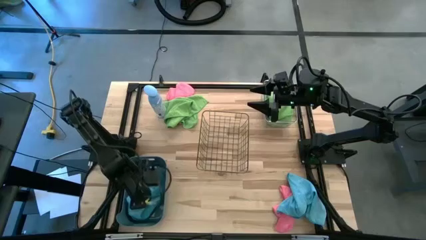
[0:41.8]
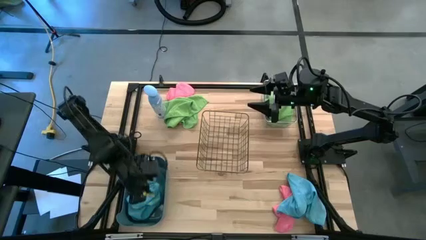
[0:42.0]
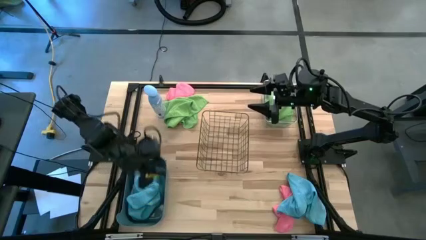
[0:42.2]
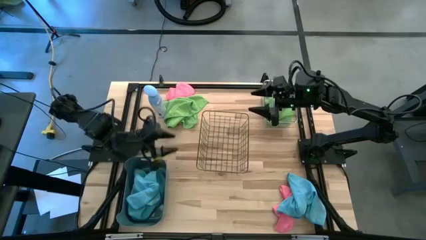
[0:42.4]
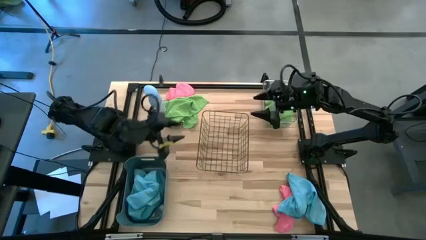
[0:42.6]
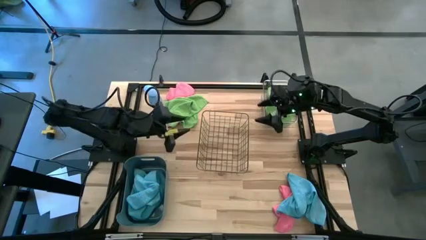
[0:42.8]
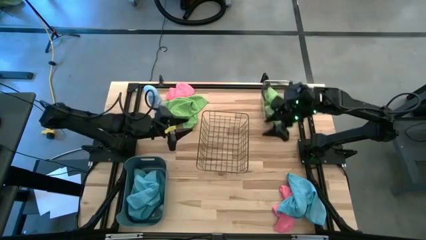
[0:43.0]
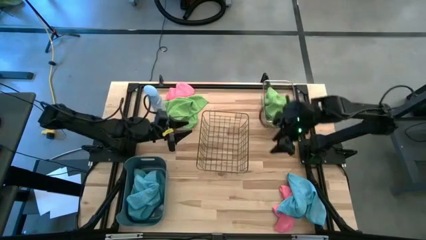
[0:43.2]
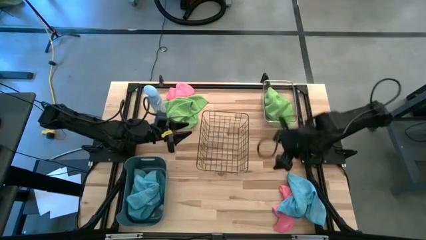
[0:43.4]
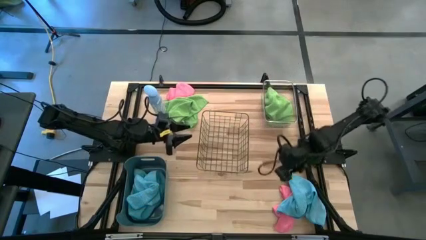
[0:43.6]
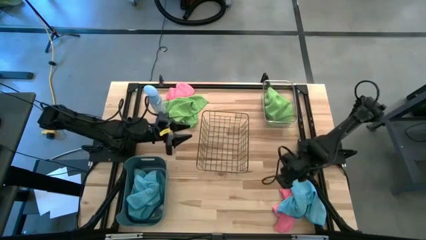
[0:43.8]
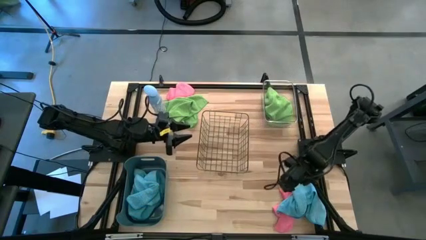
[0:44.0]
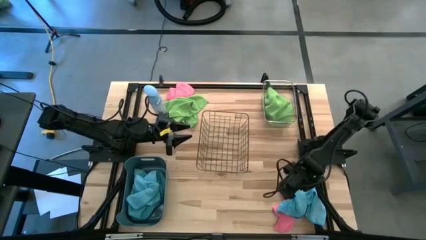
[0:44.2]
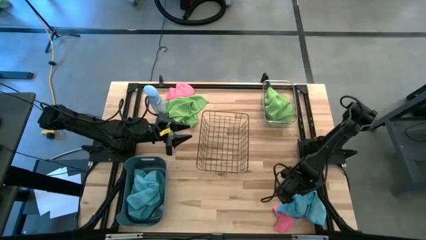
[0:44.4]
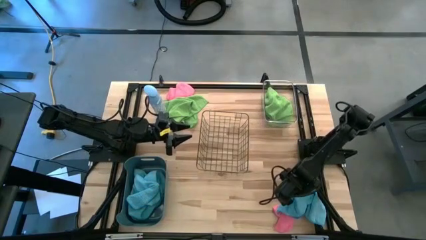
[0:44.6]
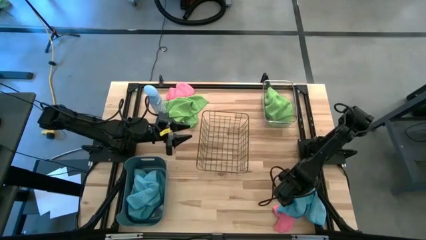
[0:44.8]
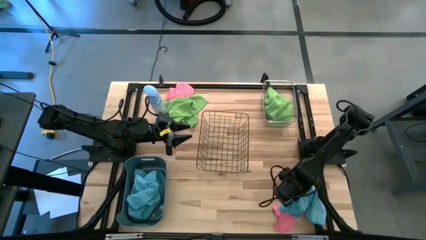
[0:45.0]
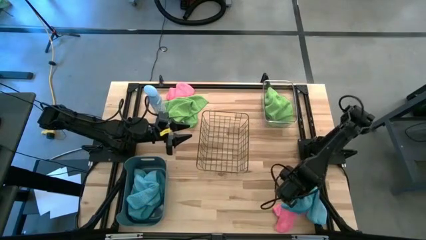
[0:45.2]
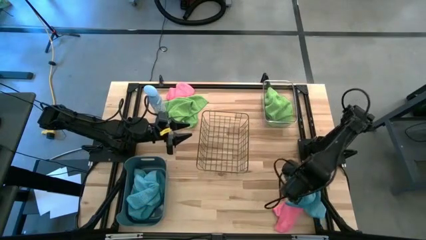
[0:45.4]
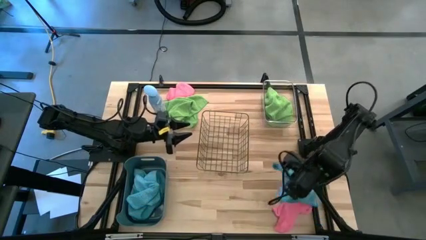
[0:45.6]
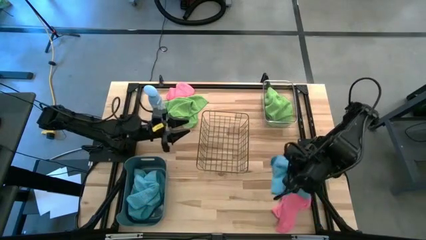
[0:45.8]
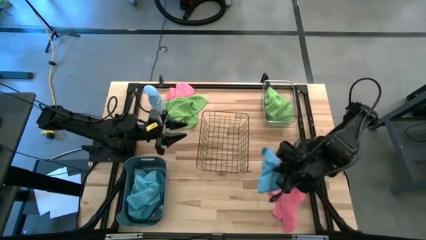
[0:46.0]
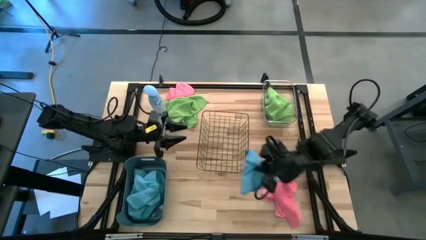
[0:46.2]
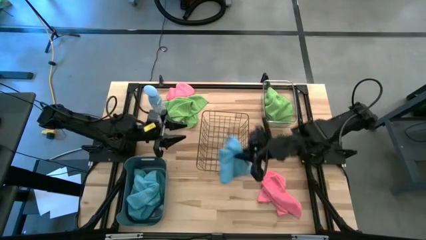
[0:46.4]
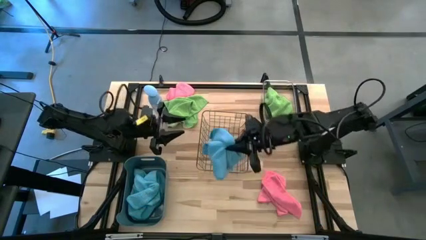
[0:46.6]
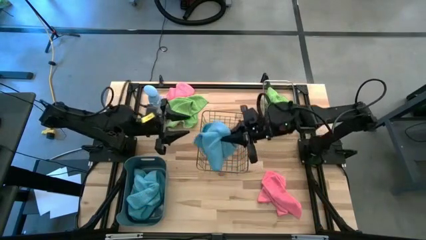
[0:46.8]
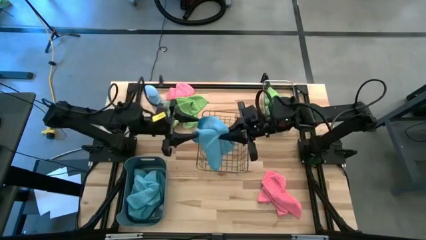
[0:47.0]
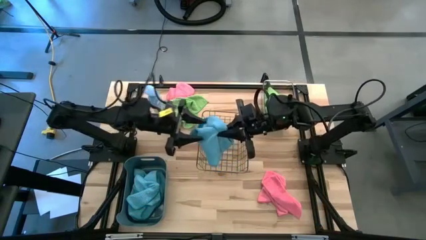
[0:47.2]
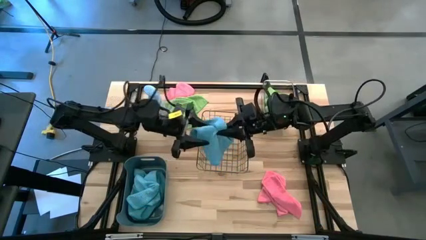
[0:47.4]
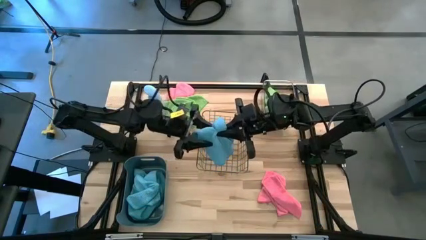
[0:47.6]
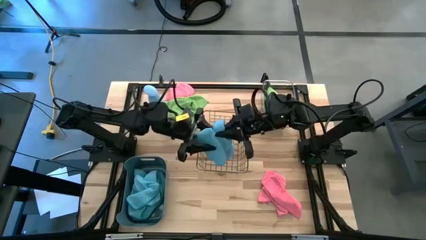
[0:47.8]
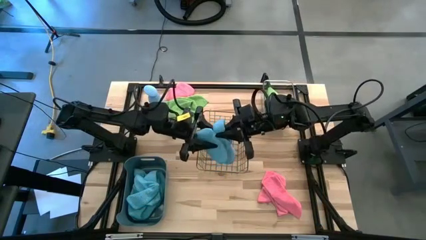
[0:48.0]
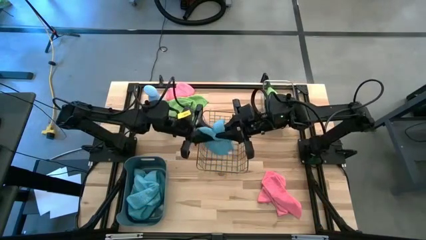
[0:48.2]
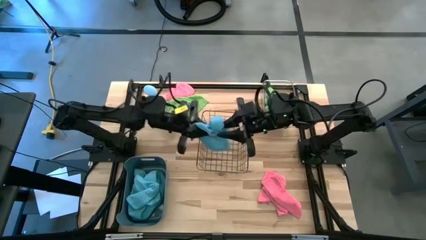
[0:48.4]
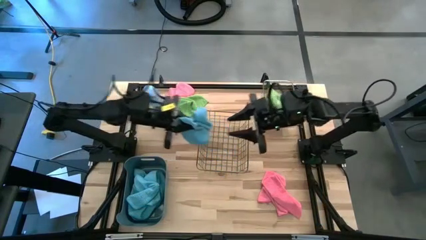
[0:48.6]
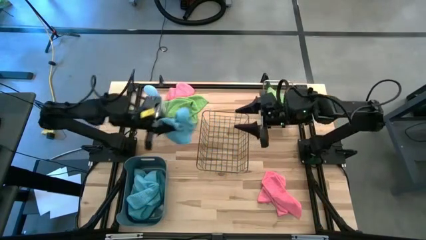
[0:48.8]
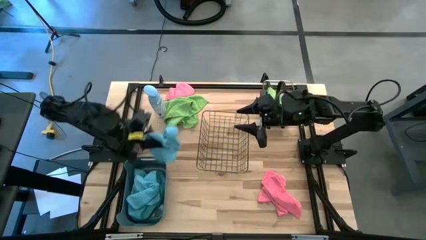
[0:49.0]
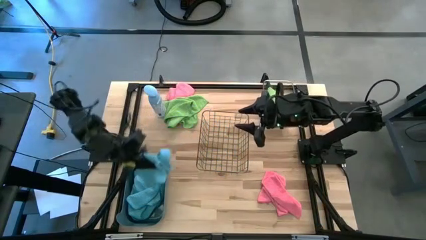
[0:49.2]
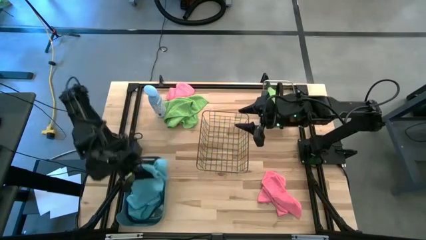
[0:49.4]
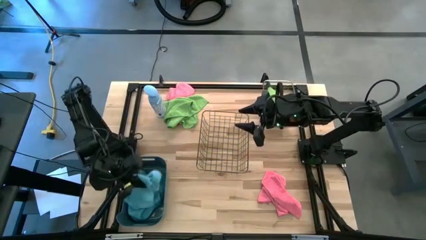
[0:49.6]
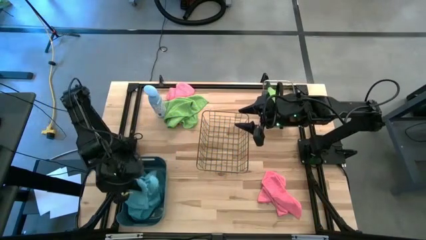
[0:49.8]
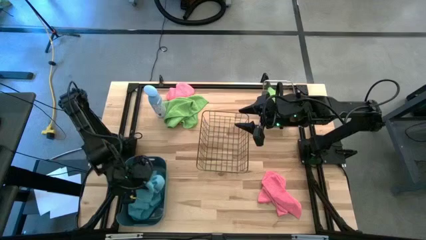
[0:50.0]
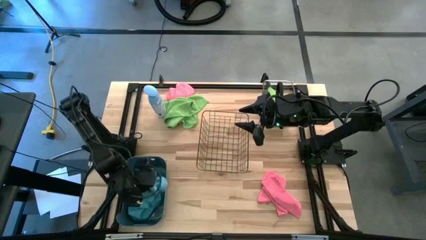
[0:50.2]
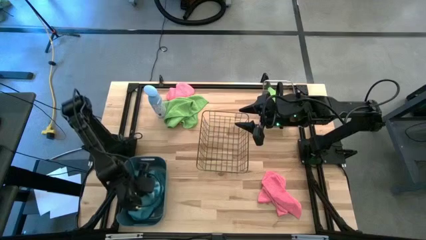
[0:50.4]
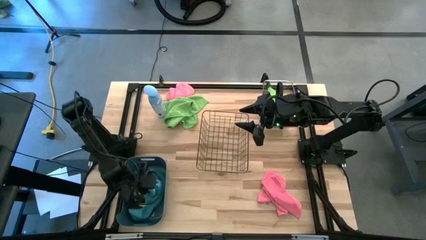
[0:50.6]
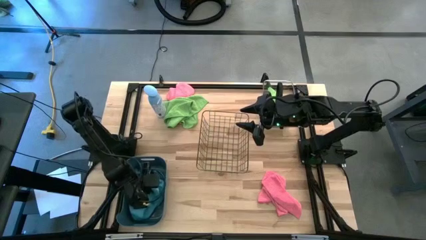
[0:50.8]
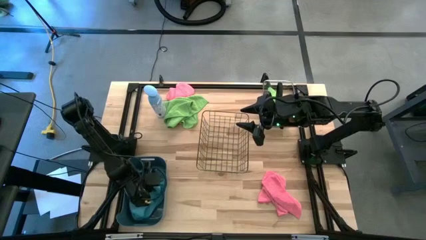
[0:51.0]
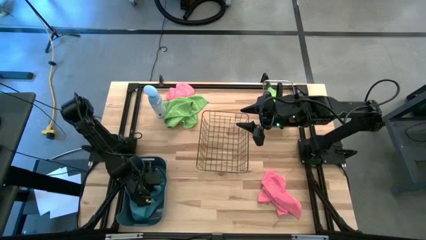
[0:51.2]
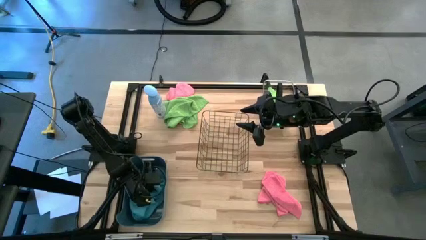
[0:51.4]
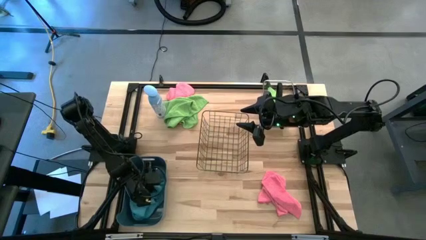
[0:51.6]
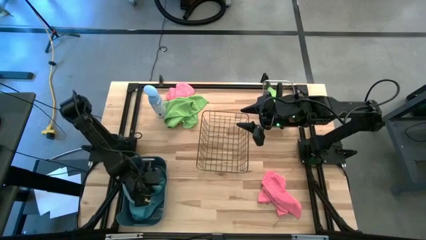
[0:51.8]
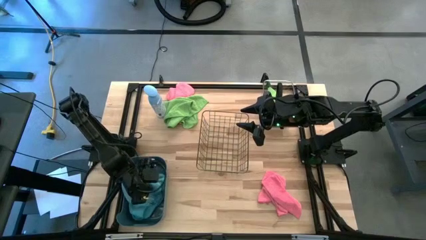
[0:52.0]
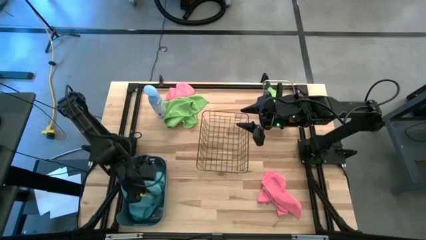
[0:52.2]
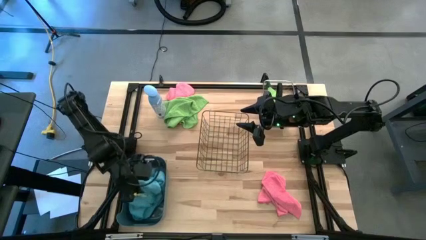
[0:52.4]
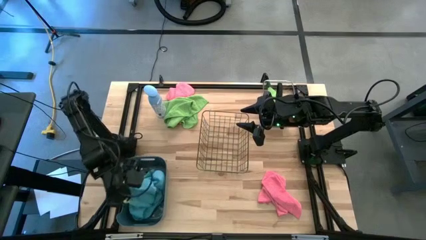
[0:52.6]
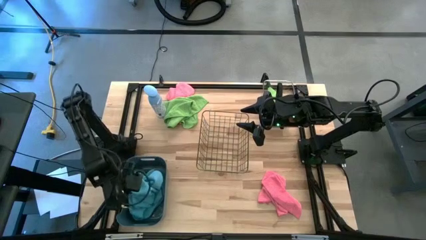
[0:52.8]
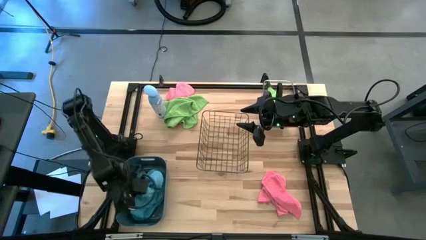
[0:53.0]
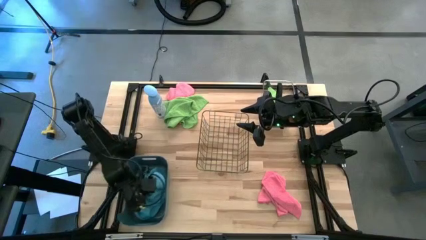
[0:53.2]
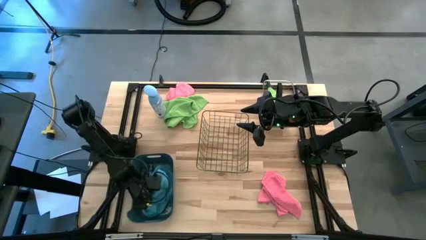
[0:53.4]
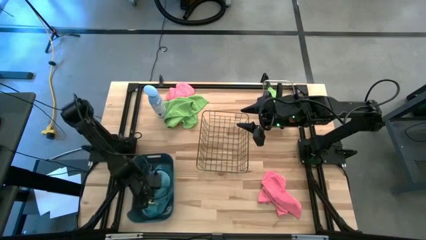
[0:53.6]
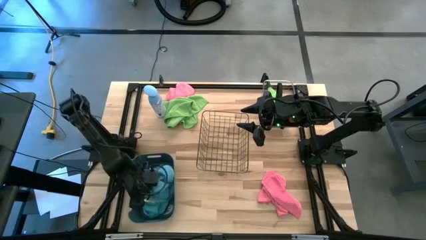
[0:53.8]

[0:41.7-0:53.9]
Task: Sort microfiber towel by color & place in baskets
Put the blue microfiber cloth into the blue bin

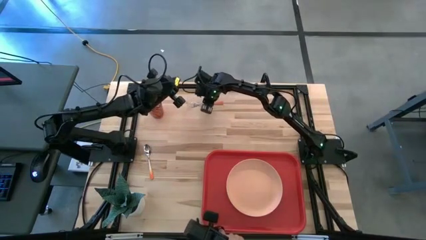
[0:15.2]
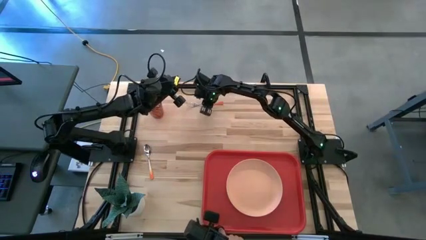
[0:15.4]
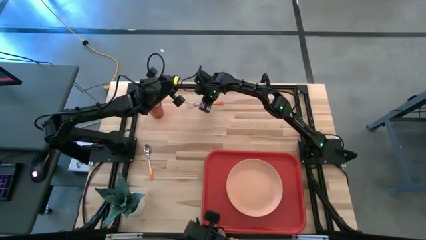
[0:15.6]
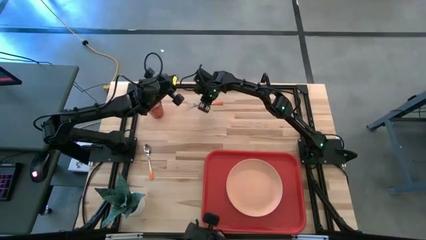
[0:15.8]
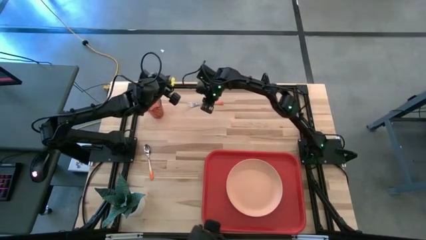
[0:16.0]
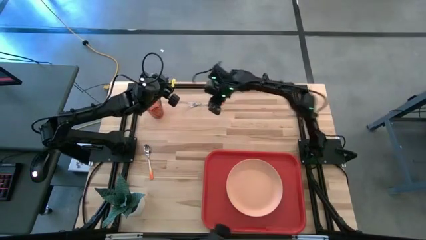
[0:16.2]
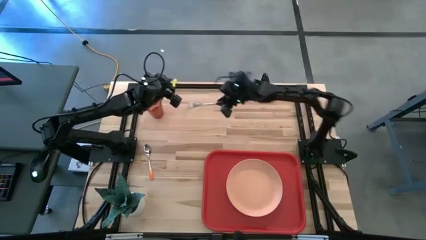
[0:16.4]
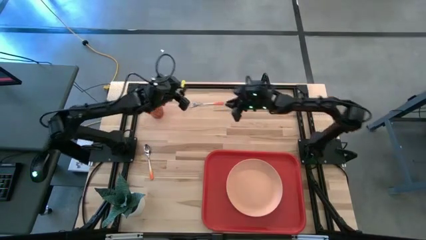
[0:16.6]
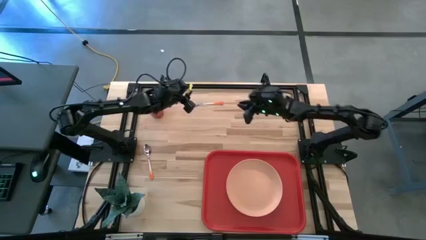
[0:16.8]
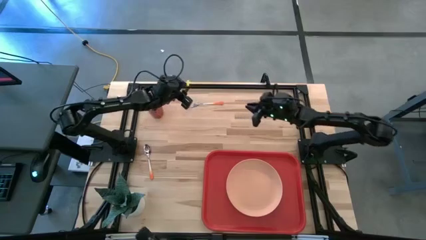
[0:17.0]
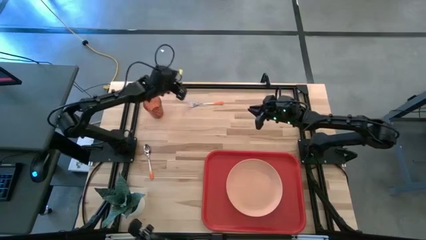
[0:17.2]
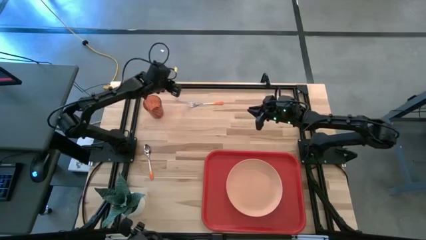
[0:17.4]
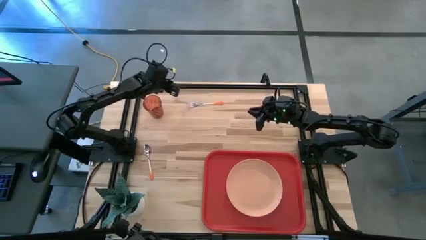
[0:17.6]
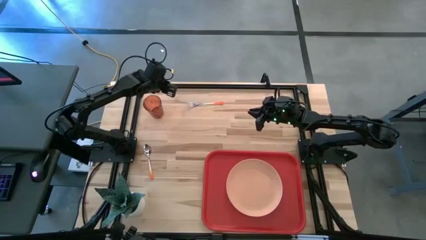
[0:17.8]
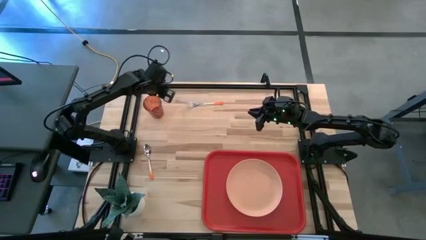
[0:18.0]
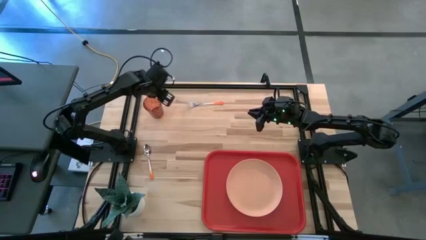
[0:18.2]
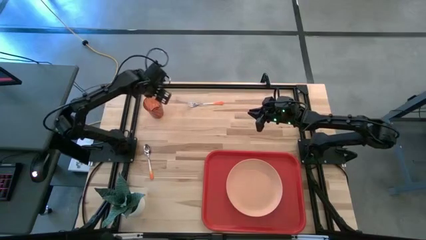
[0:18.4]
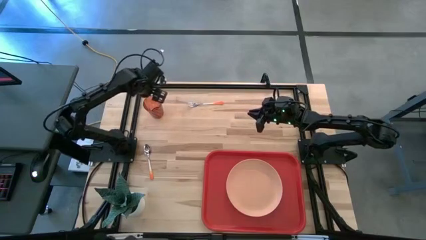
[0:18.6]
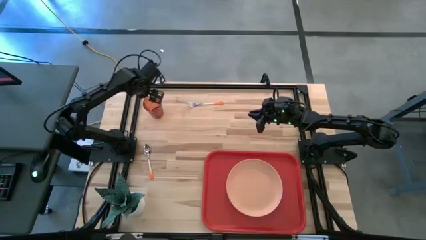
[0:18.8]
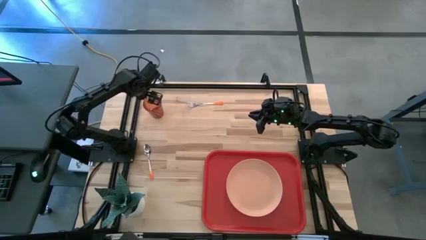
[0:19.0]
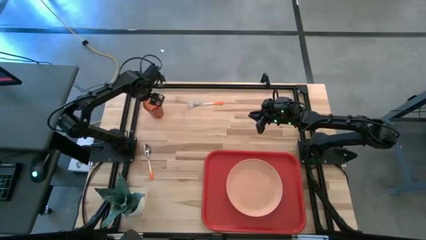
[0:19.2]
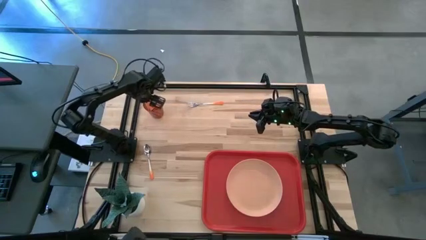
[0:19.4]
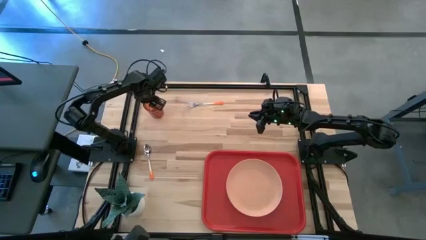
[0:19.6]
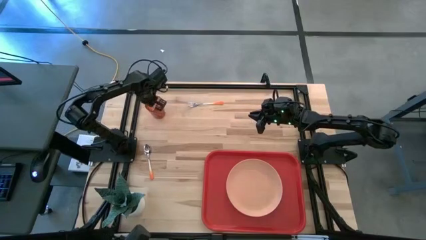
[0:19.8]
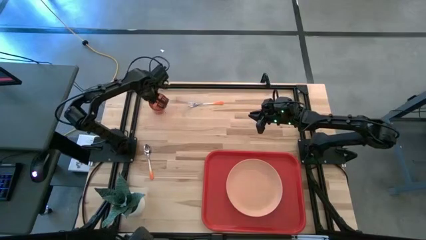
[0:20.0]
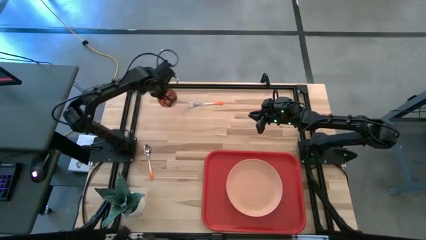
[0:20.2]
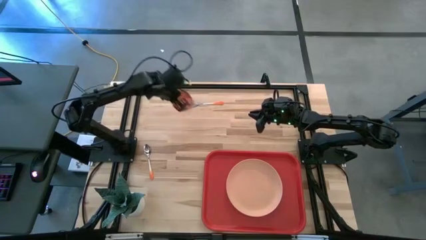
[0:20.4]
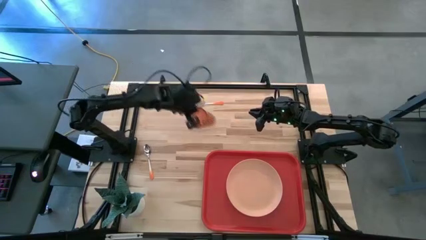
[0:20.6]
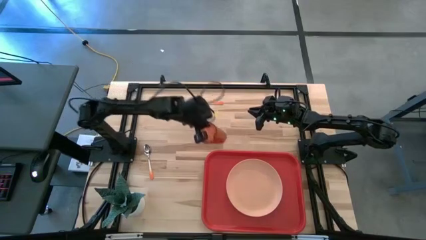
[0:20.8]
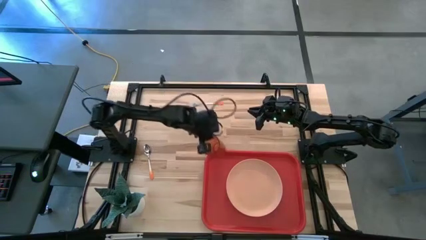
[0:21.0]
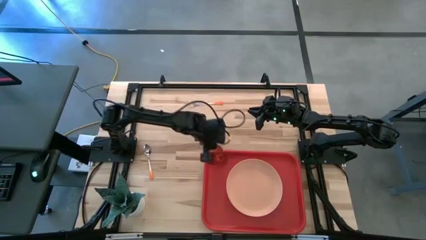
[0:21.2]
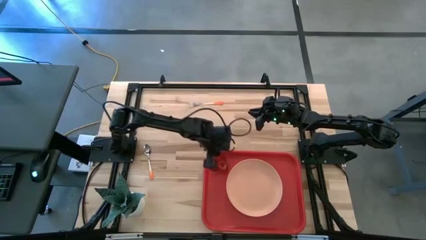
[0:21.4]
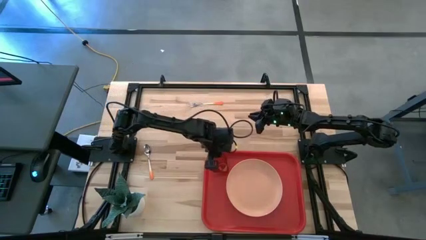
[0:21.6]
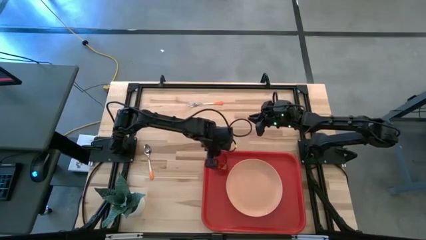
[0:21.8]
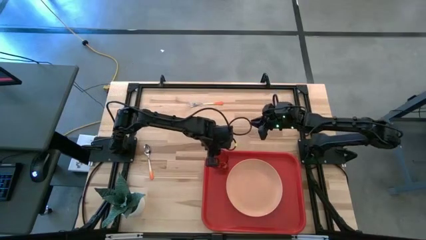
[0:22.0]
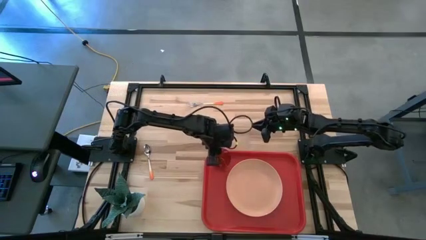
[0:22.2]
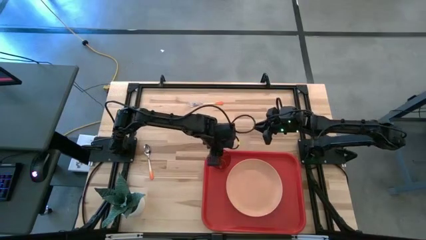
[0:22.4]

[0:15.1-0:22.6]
Task: Pick and place plate/cup/fork/spoon on tray
Put the orange glass on the orange serving tray to the top left of the light orange plate
